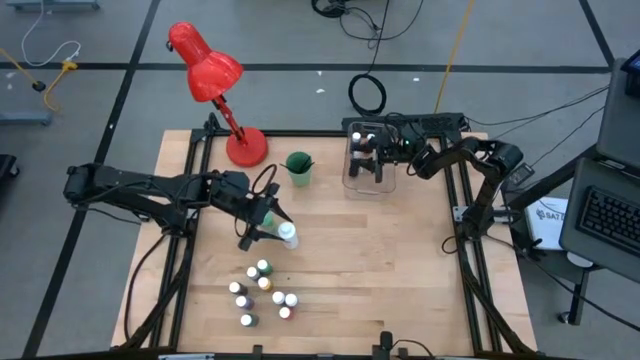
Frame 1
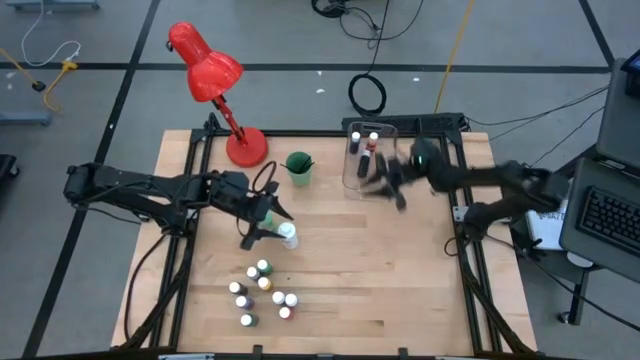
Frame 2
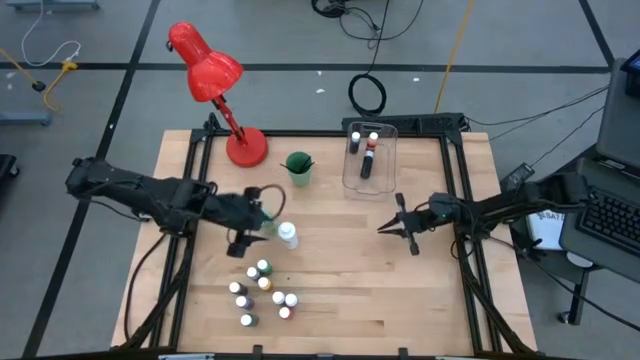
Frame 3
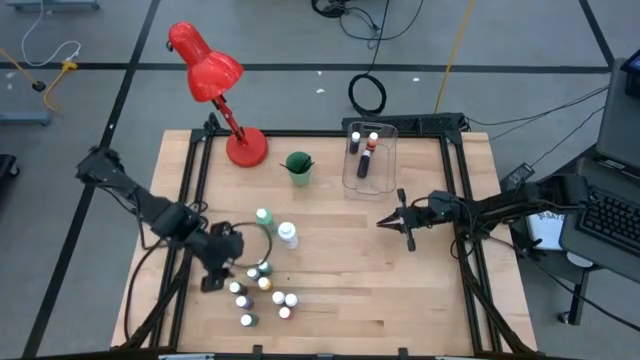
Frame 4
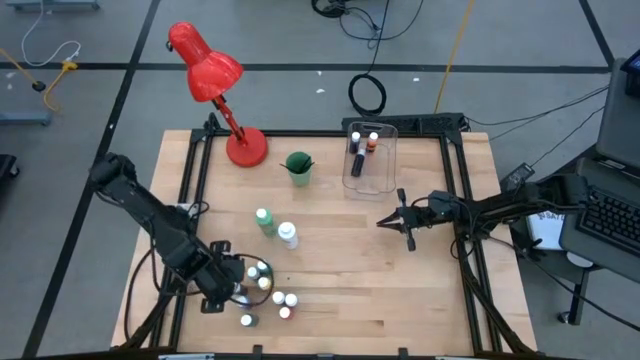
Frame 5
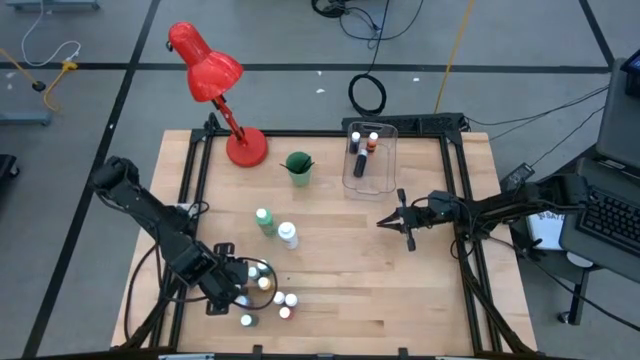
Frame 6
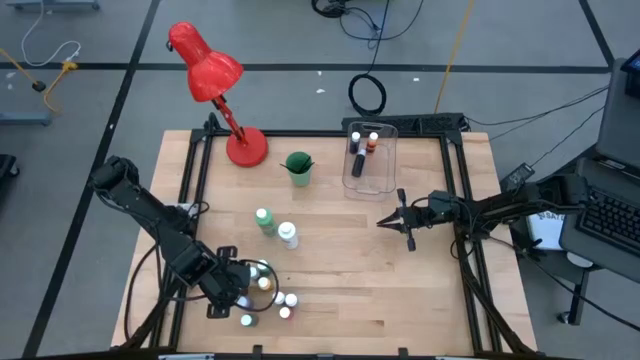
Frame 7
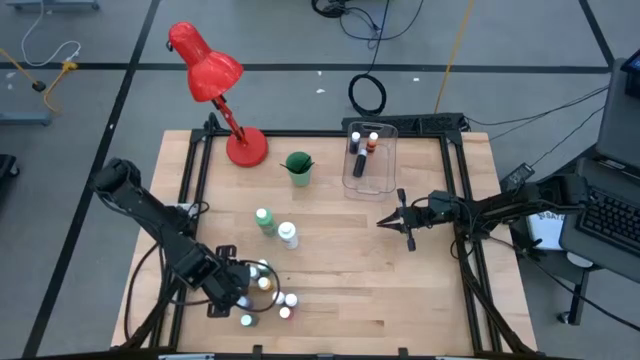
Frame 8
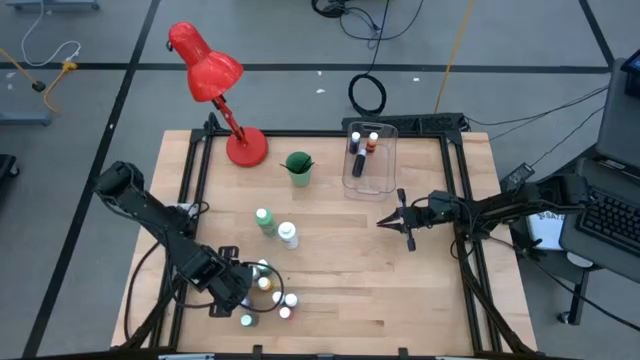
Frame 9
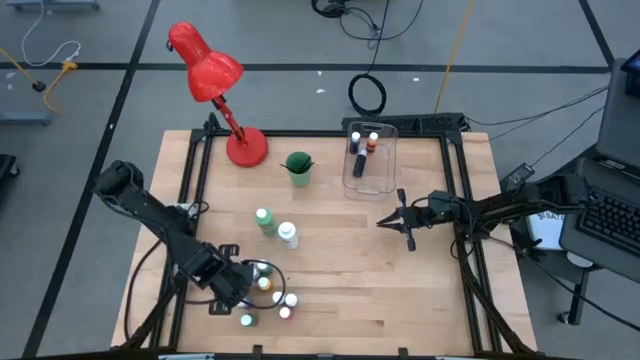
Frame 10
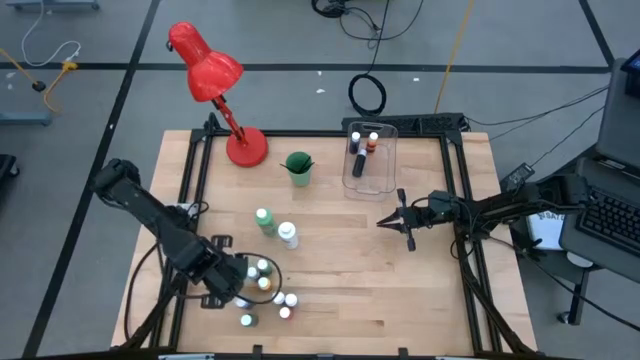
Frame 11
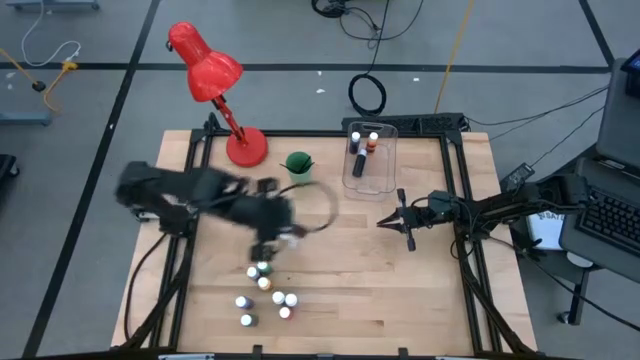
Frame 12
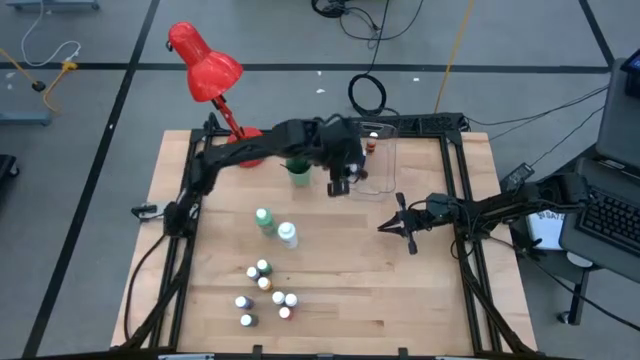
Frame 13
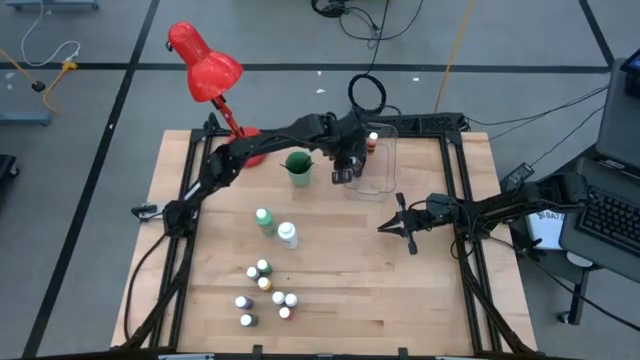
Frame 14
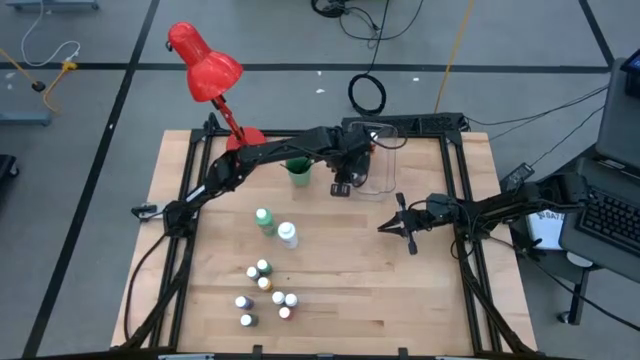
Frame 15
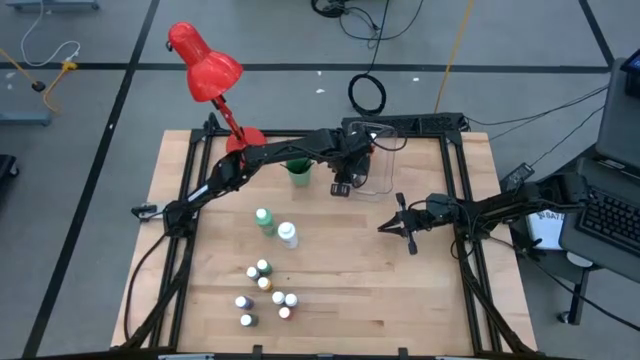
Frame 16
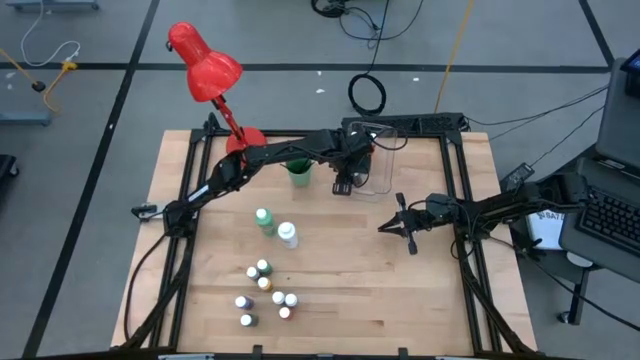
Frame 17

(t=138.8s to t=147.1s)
Task: Pick & Place Paint Supplies
Put the black paint bottle into the transparent bin

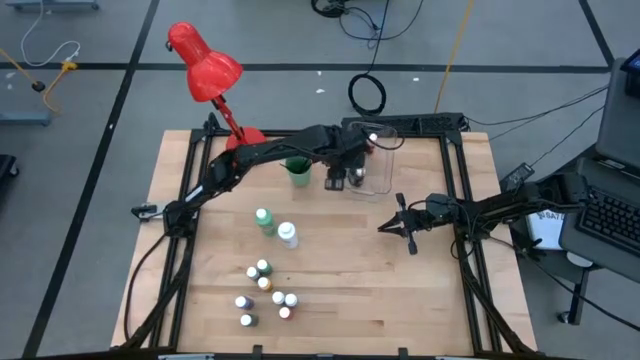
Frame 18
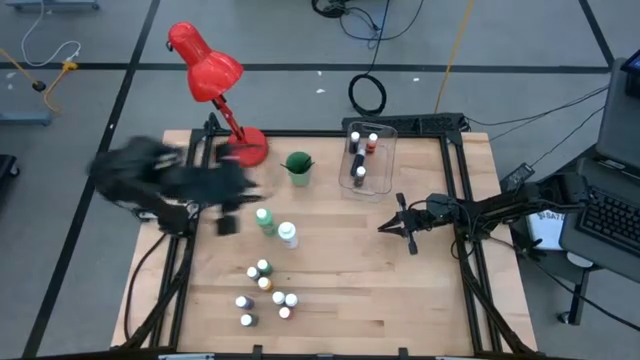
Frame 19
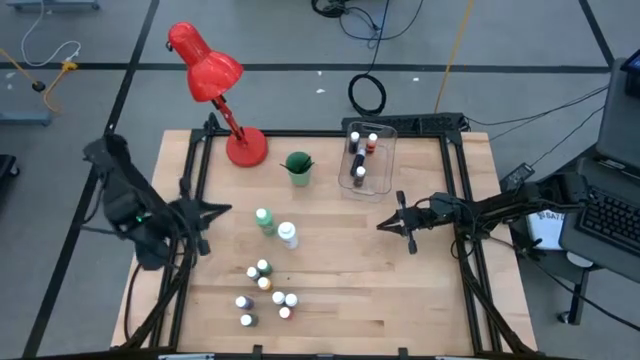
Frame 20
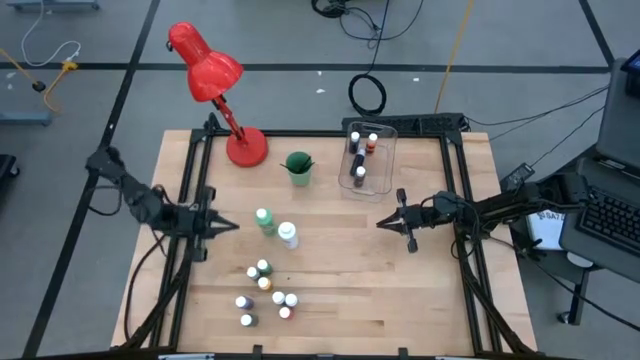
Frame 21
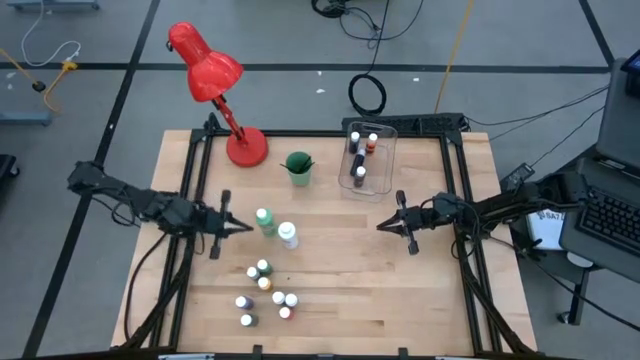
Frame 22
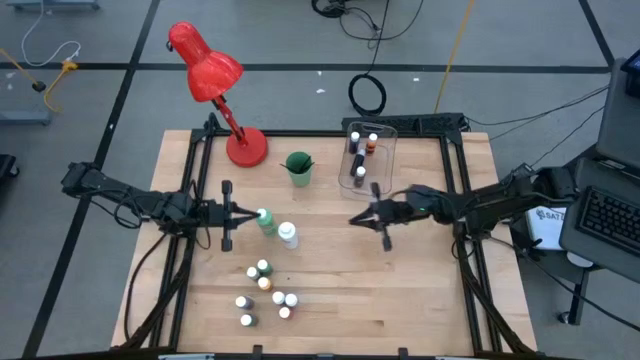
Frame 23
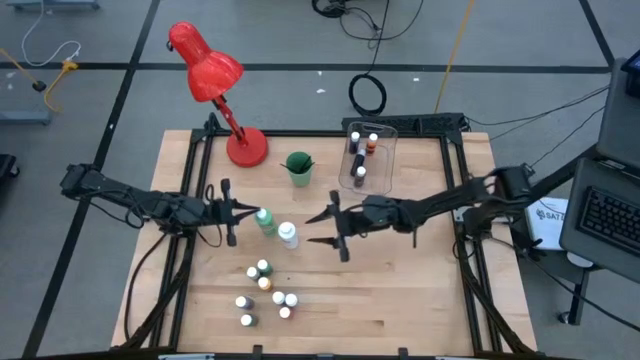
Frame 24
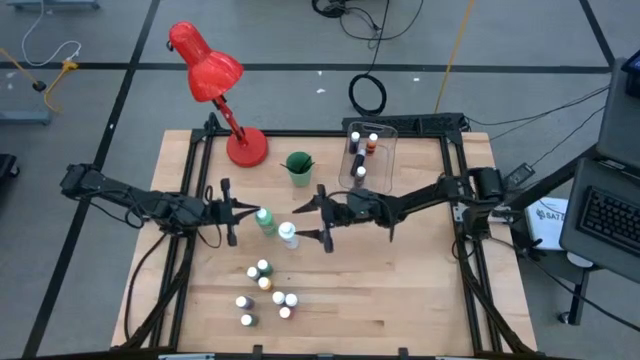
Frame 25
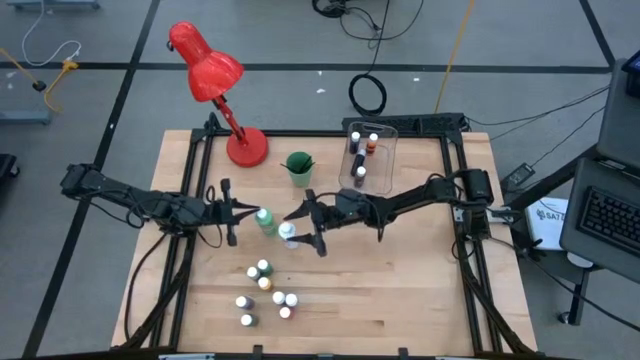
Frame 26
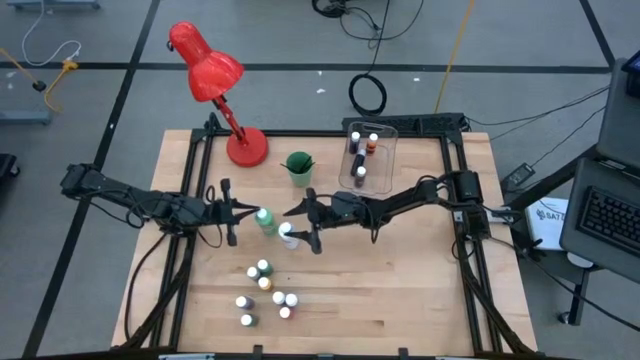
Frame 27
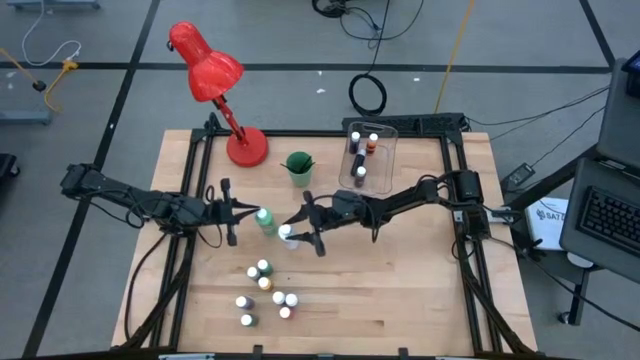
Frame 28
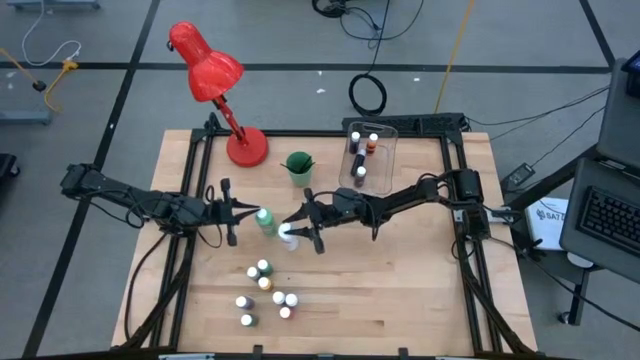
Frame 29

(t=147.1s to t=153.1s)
Put the white paint bottle into the transparent bin

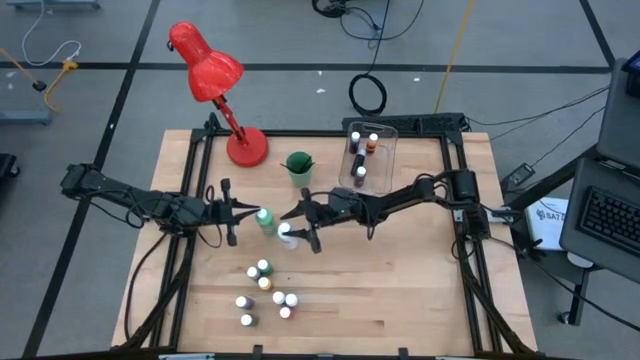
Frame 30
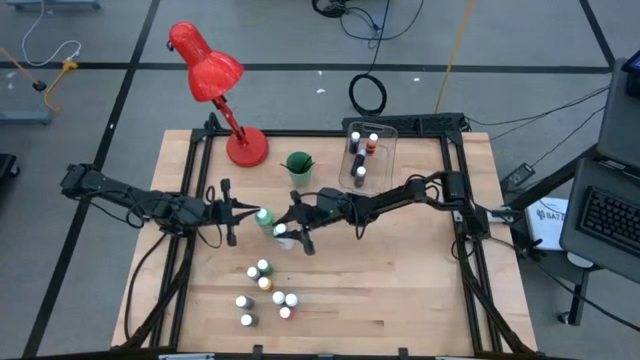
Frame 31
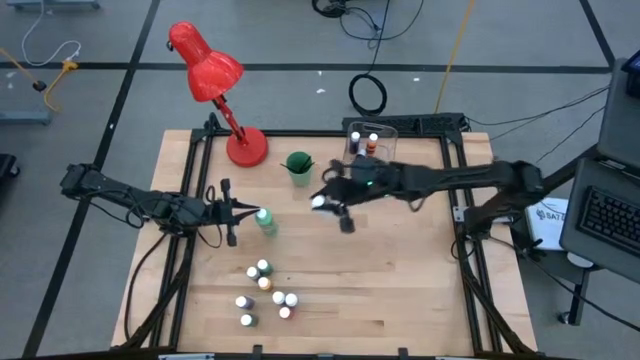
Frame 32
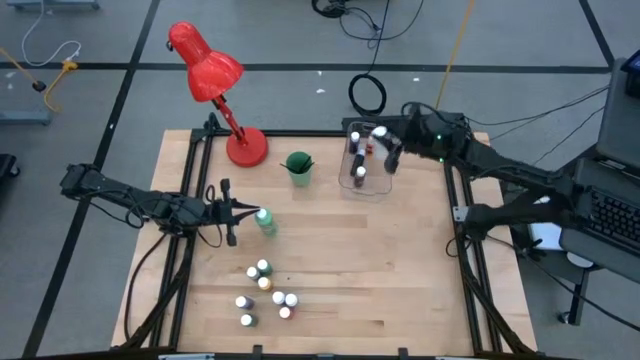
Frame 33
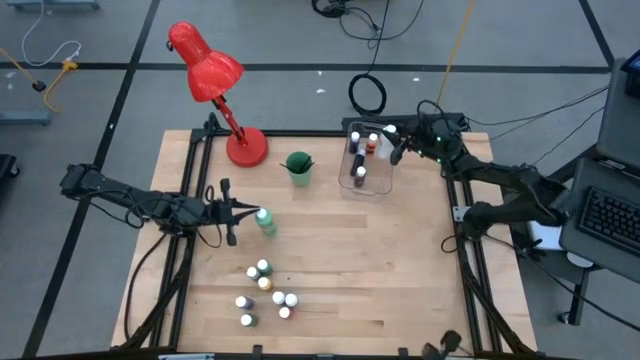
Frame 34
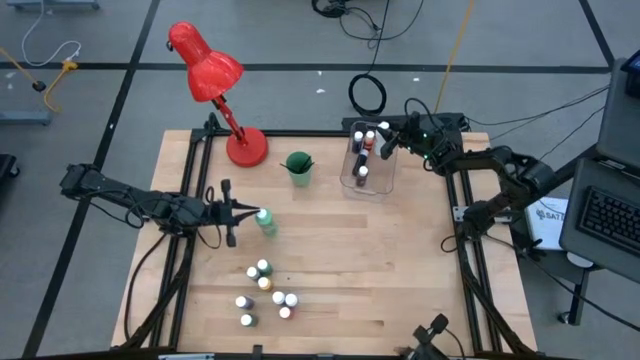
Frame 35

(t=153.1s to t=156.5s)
Put the white paint bottle into the transparent bin

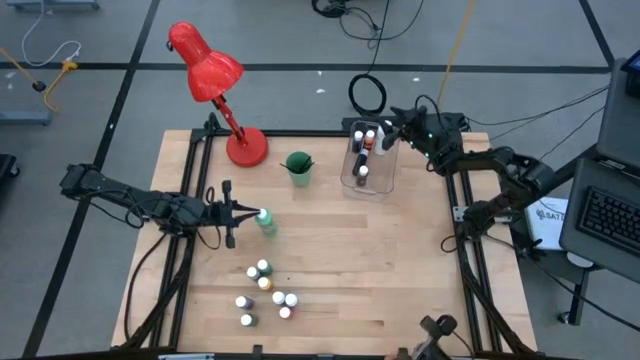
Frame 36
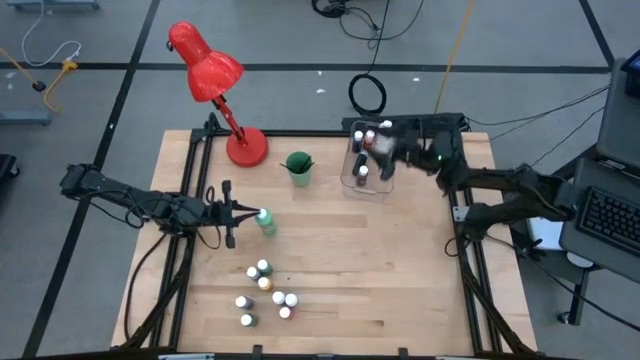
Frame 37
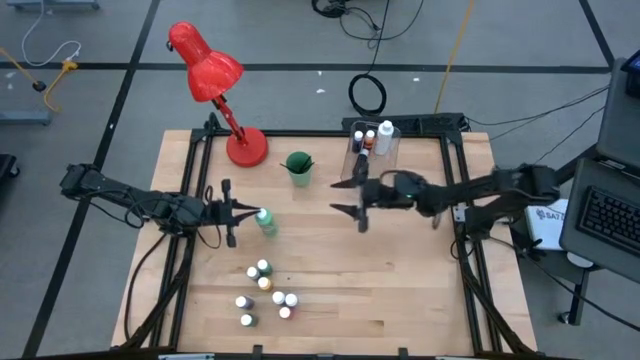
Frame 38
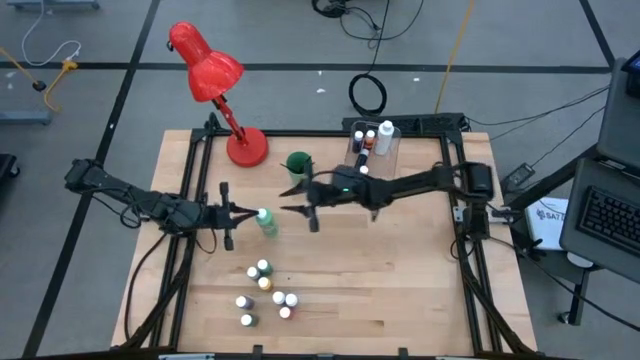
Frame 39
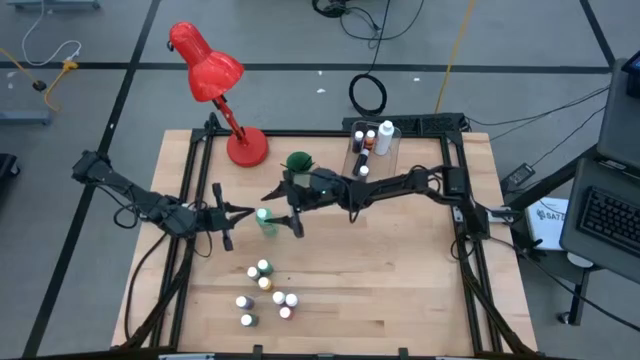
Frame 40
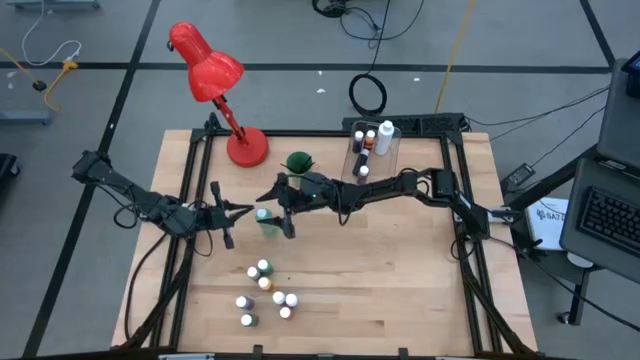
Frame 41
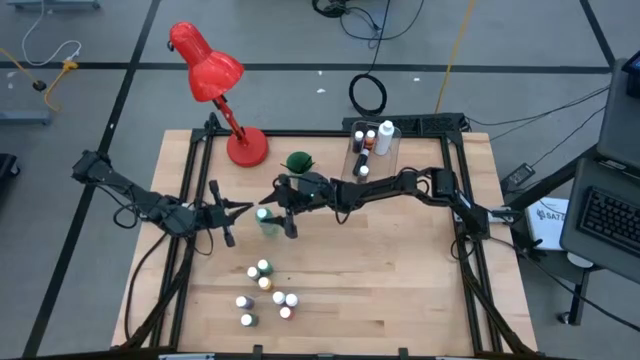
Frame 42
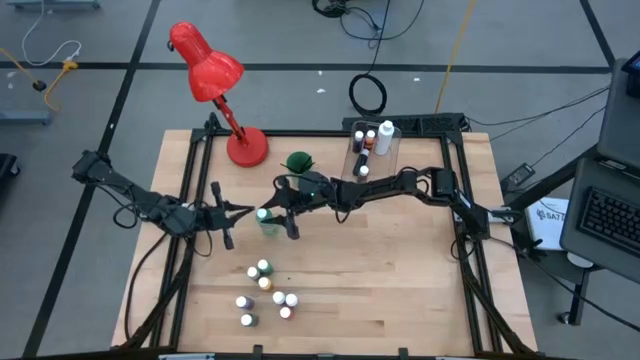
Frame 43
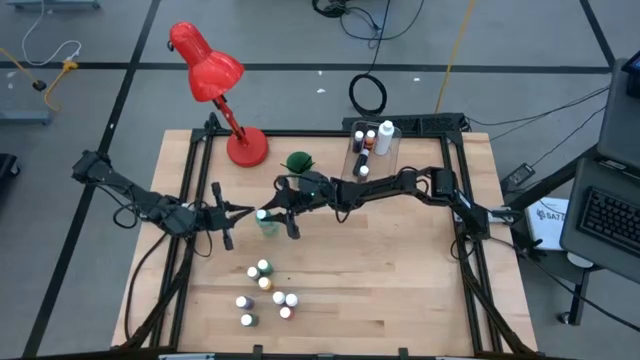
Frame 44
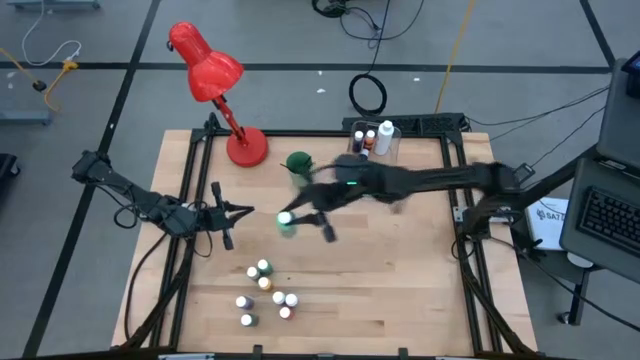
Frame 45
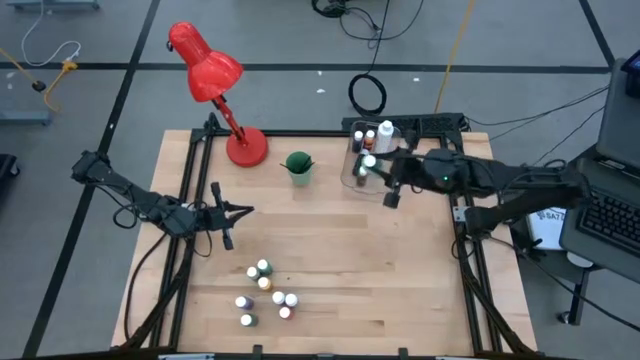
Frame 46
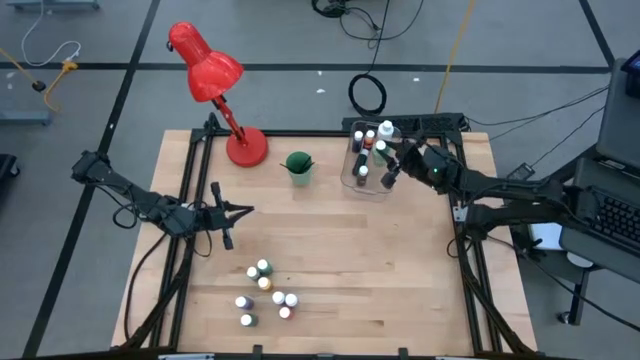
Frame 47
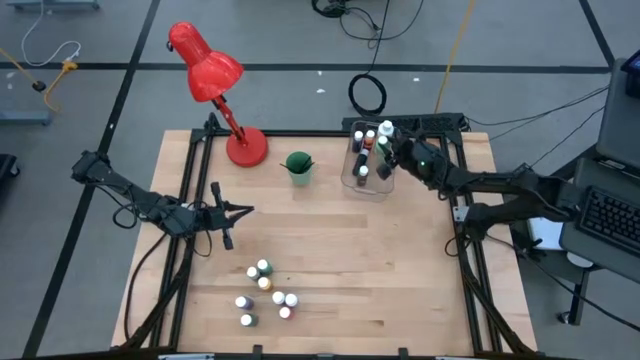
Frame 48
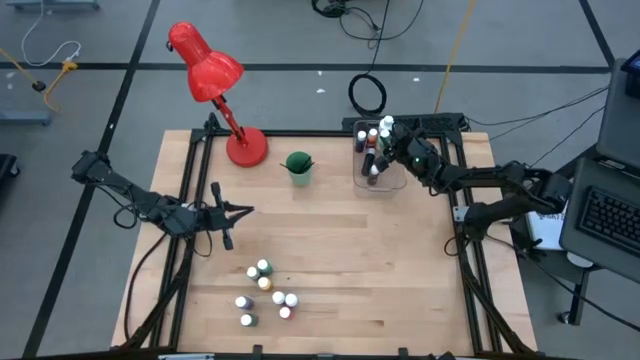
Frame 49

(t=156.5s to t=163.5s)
Put the large green paint bottle into the transparent bin
